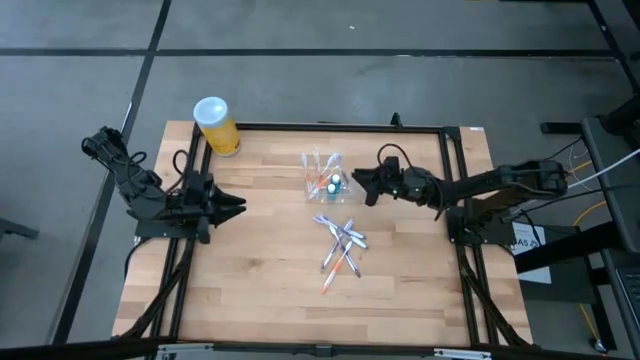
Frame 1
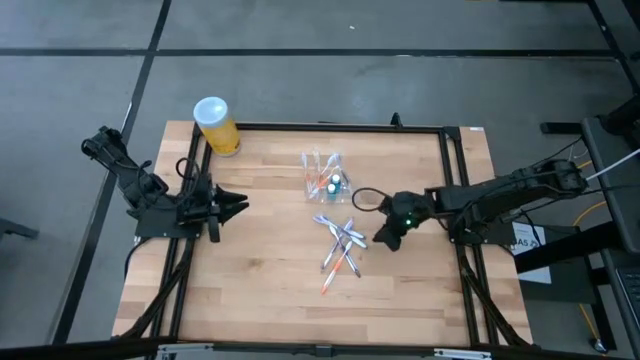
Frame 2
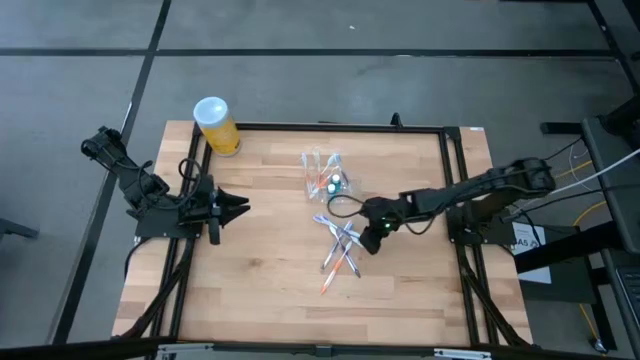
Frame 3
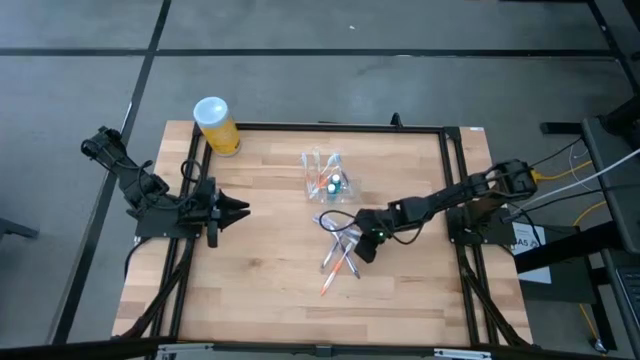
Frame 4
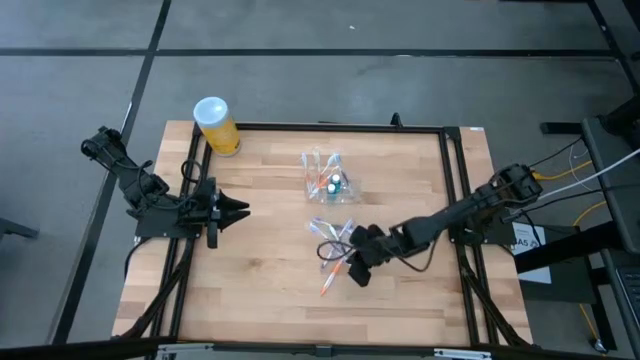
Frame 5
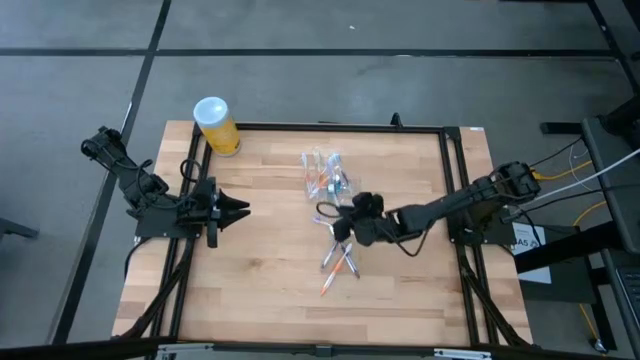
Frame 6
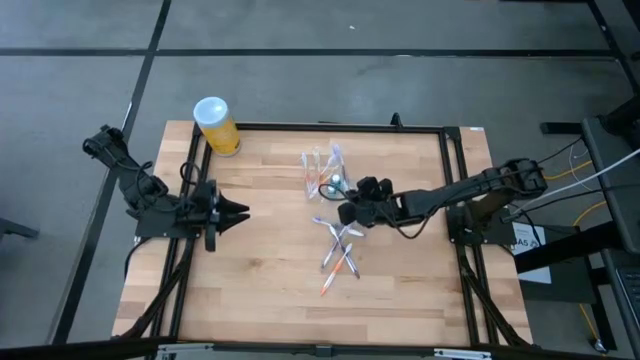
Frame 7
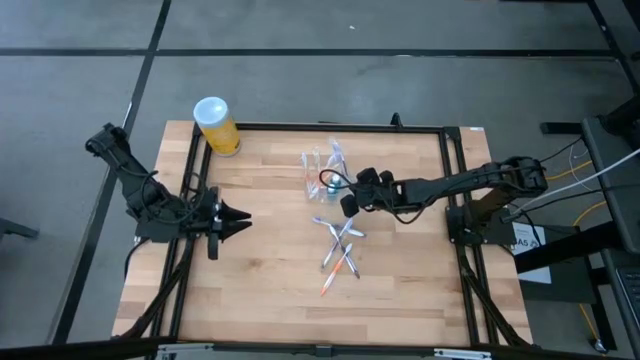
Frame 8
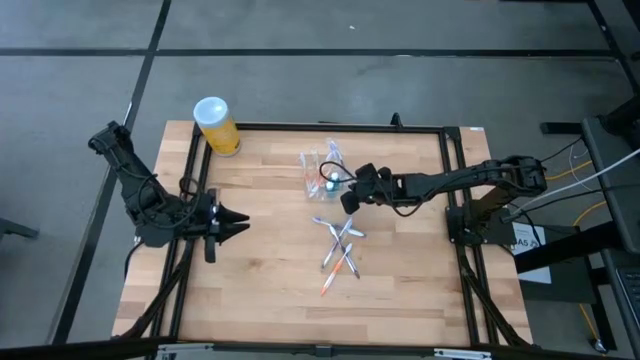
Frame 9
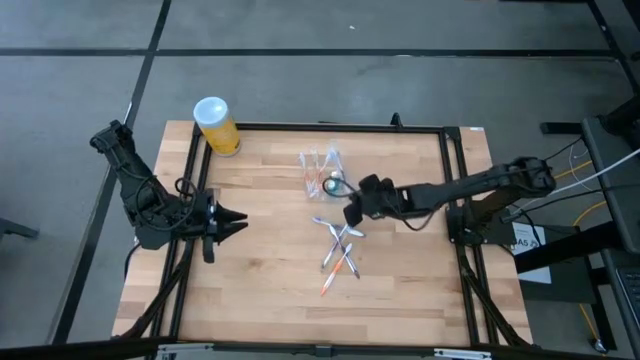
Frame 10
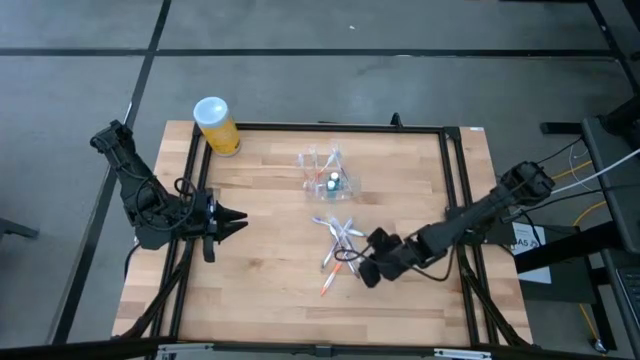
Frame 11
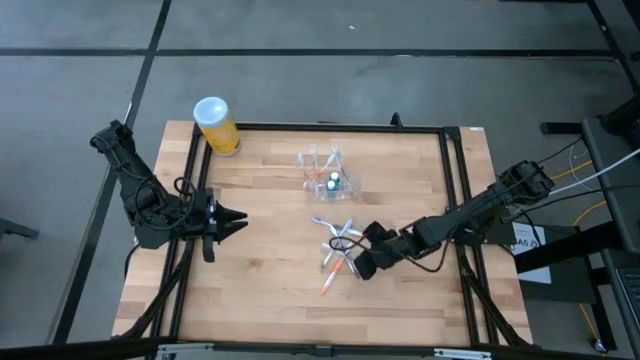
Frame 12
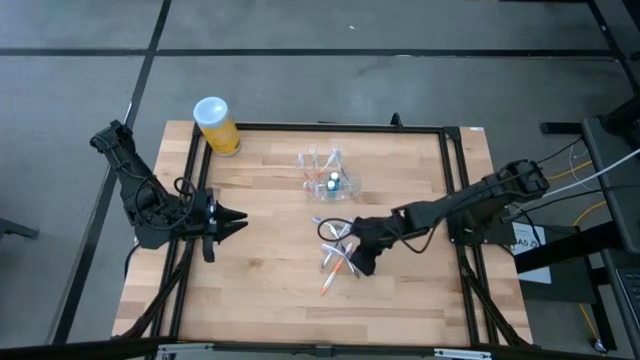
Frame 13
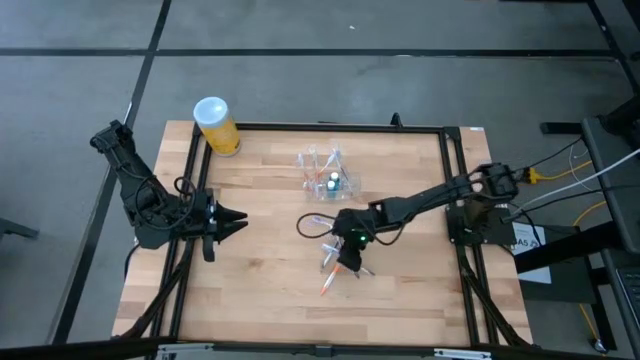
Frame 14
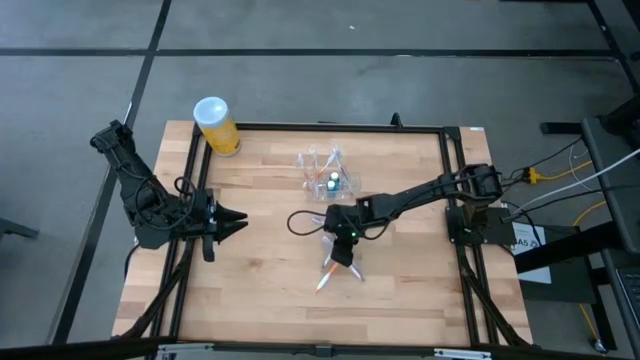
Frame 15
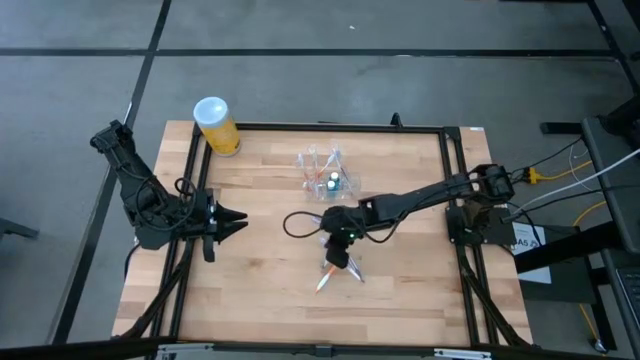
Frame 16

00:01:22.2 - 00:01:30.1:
Task: Pick & Place toothbrushing station
Put the violet toothbrush into the transparent organizer

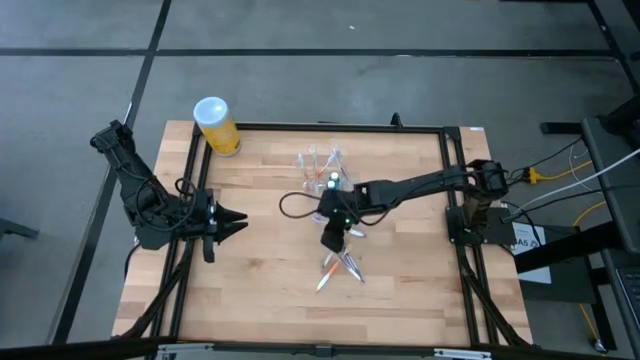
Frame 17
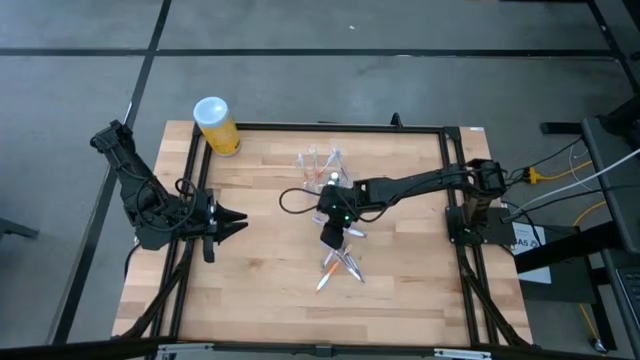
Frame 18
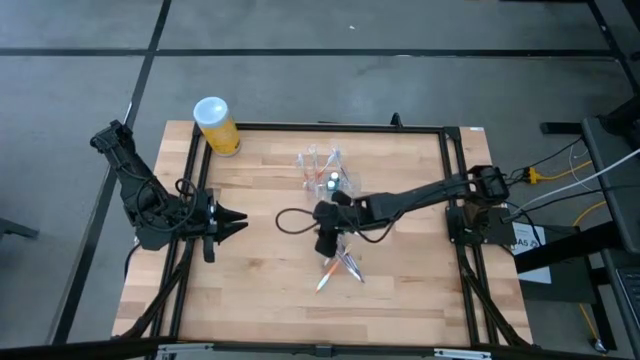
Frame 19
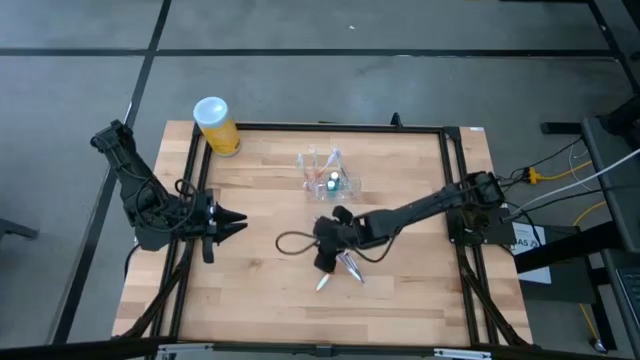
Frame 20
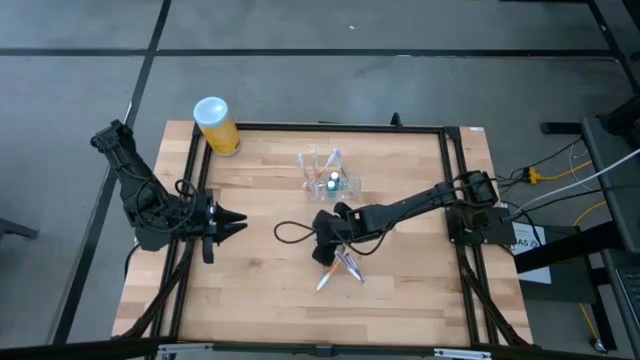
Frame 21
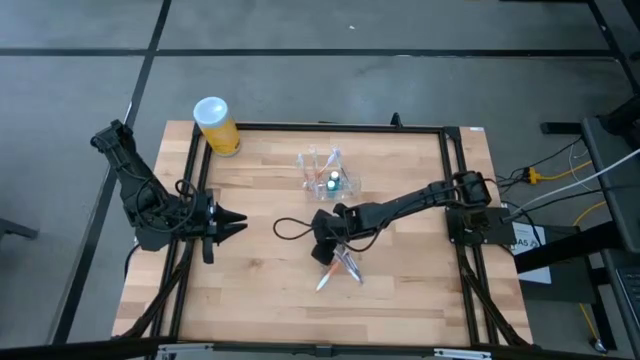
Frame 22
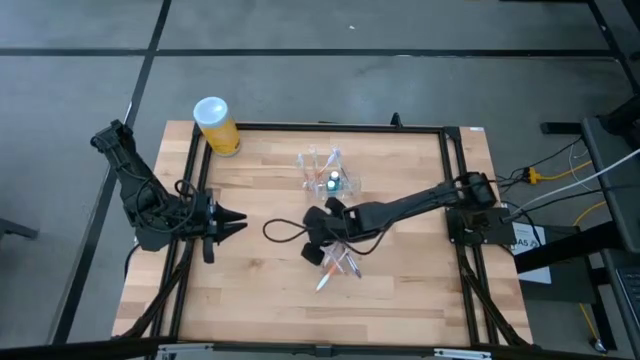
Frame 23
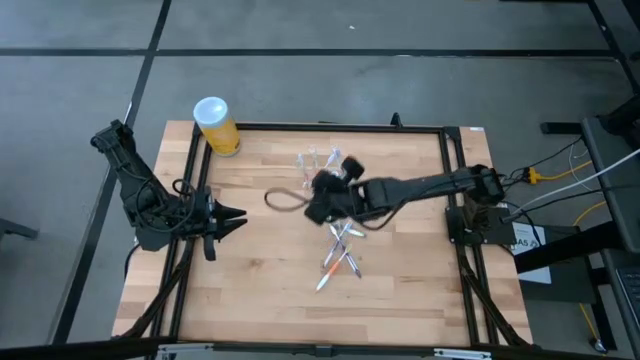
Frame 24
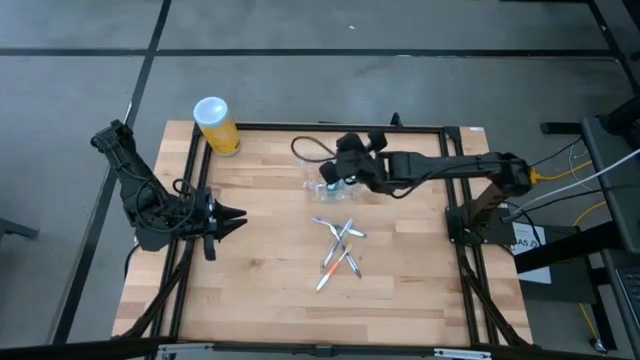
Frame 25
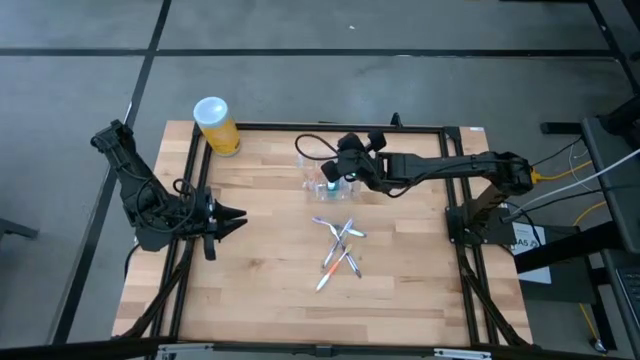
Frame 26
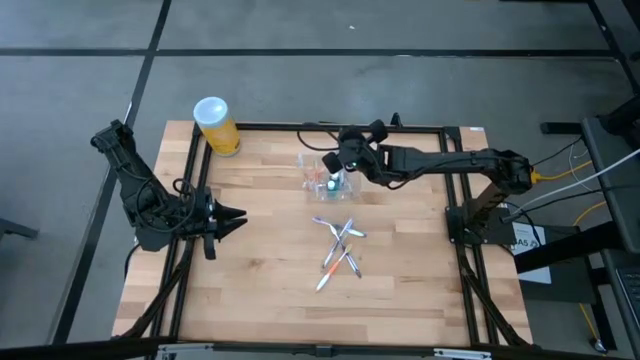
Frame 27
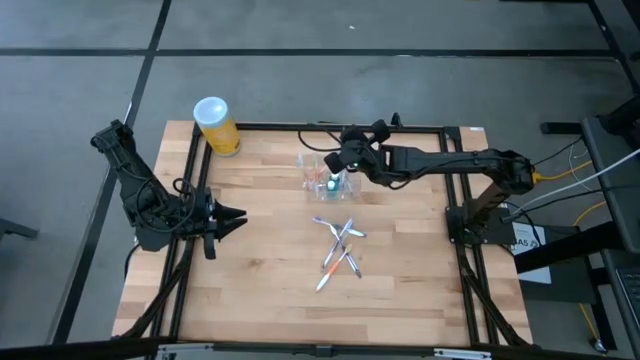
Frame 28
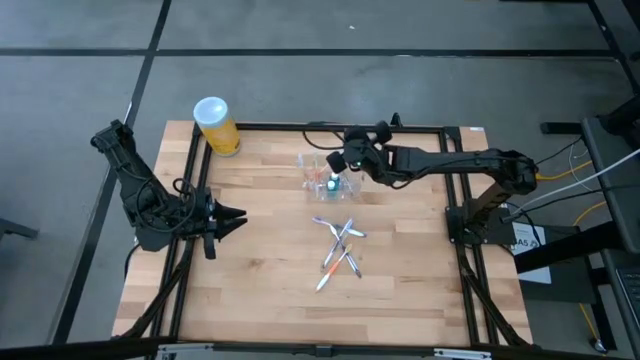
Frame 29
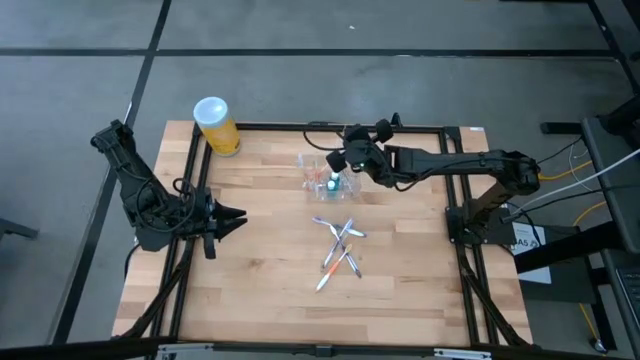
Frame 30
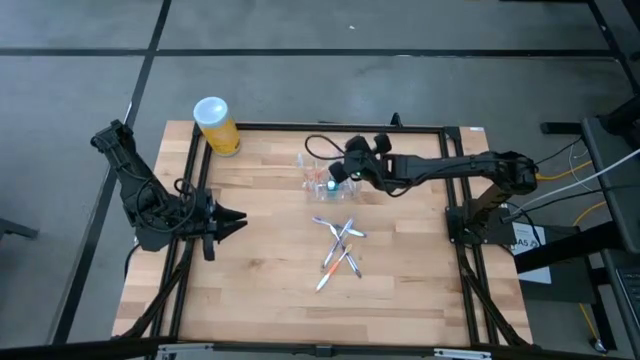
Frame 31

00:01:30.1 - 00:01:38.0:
Put the violet toothbrush into the transparent organizer

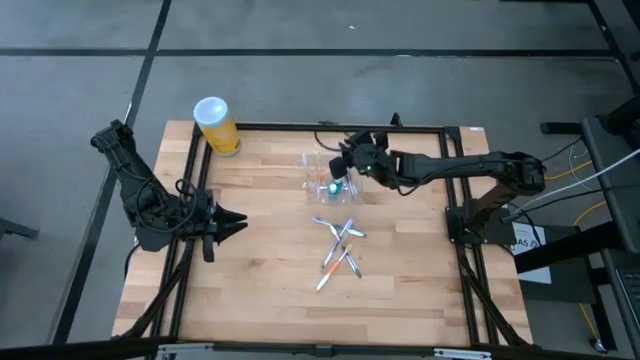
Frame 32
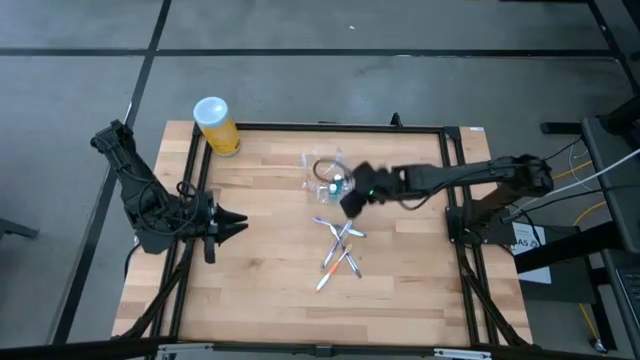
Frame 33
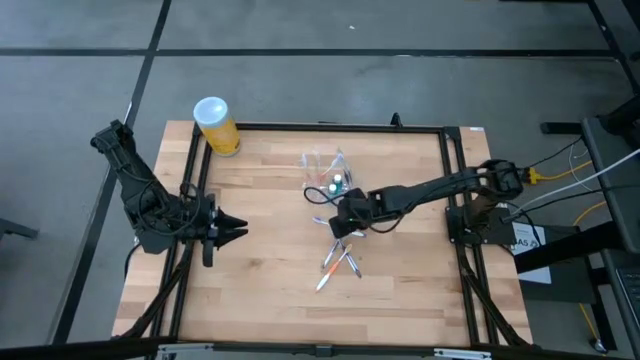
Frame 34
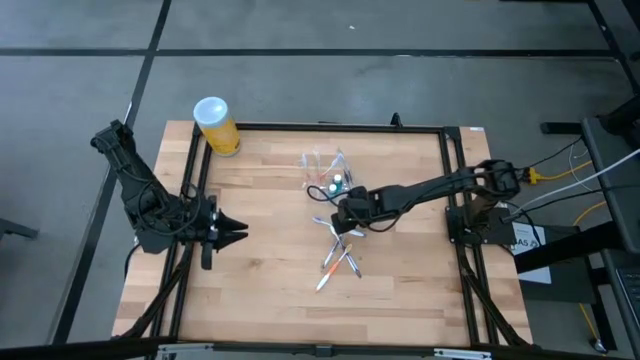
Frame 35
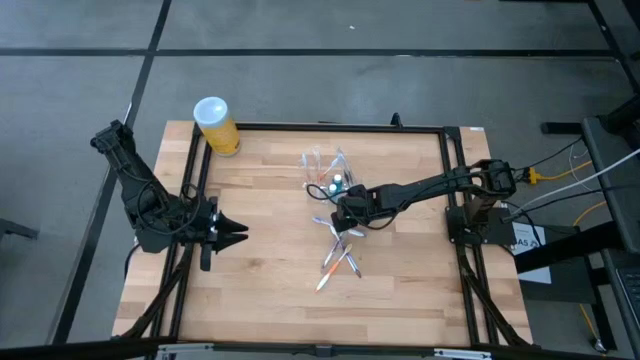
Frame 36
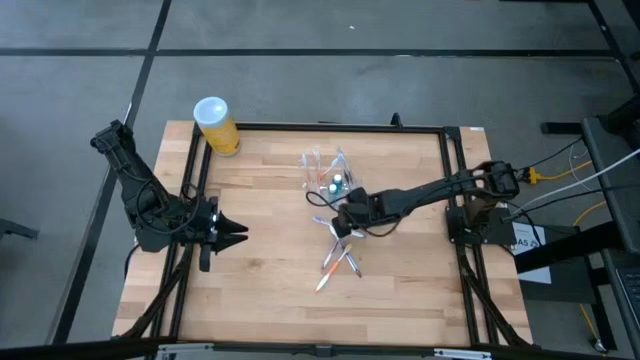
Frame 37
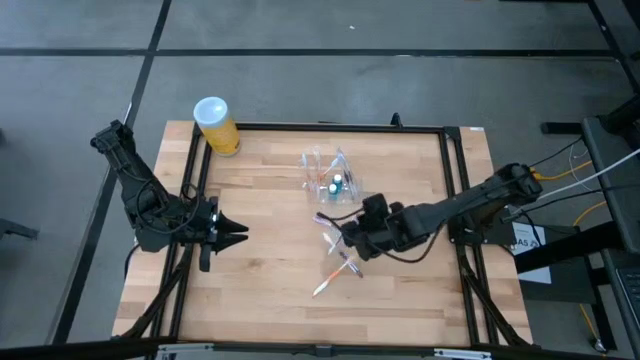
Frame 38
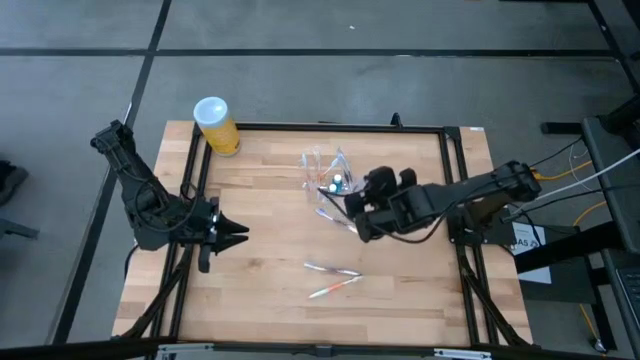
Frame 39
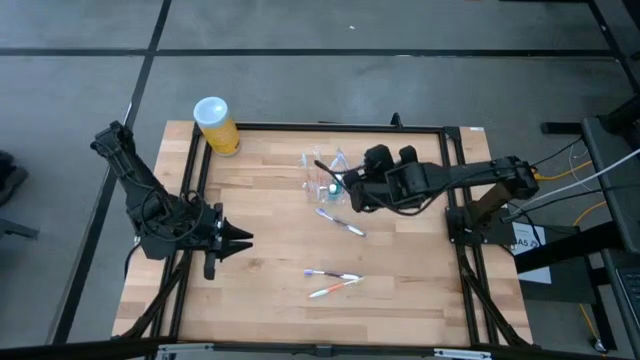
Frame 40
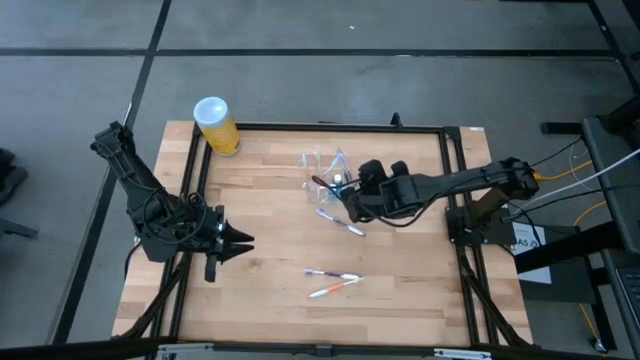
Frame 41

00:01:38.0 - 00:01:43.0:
Put the violet toothbrush into the transparent organizer
